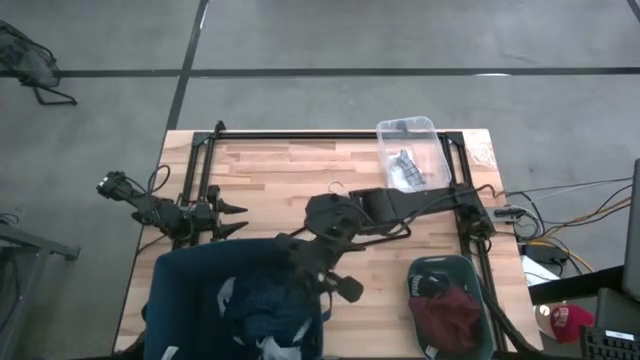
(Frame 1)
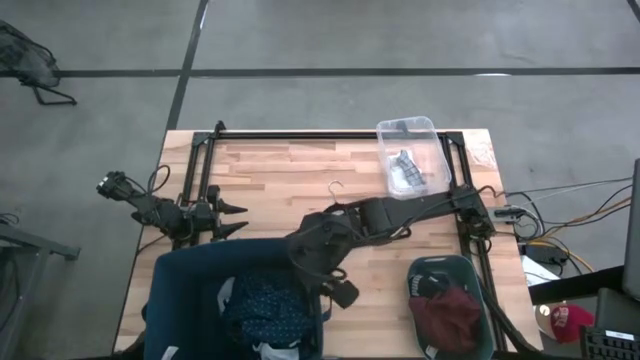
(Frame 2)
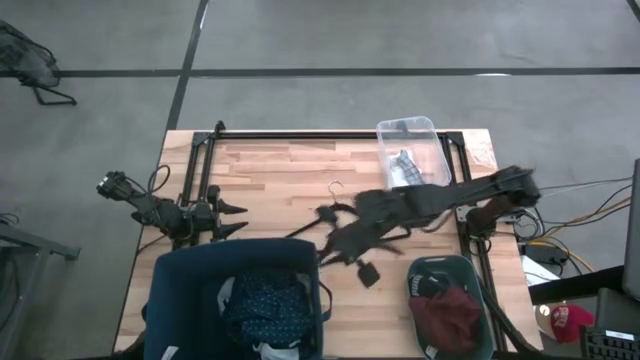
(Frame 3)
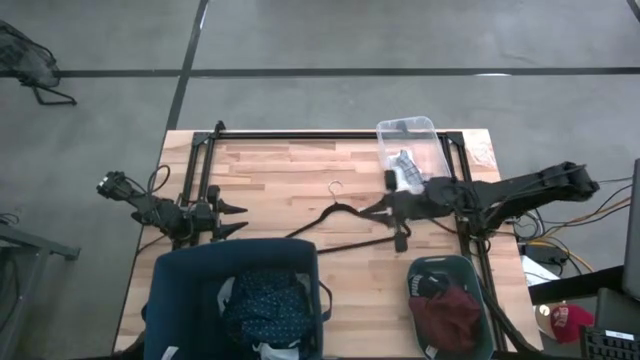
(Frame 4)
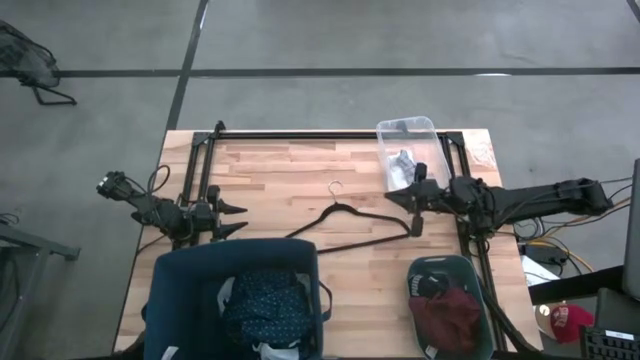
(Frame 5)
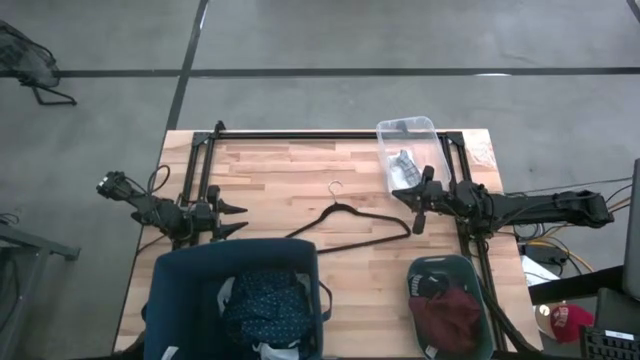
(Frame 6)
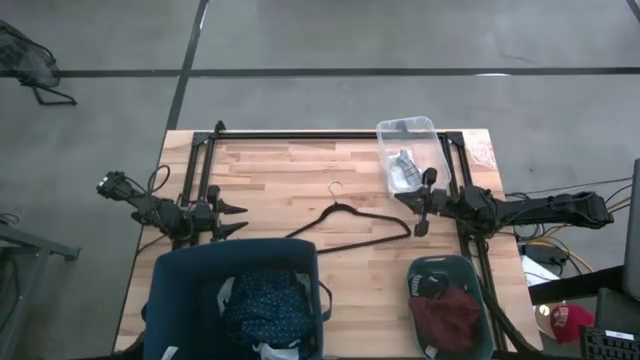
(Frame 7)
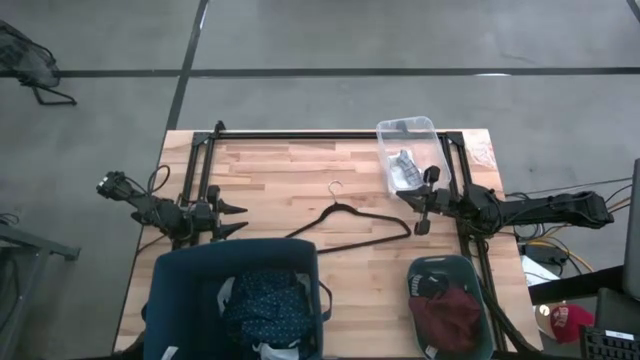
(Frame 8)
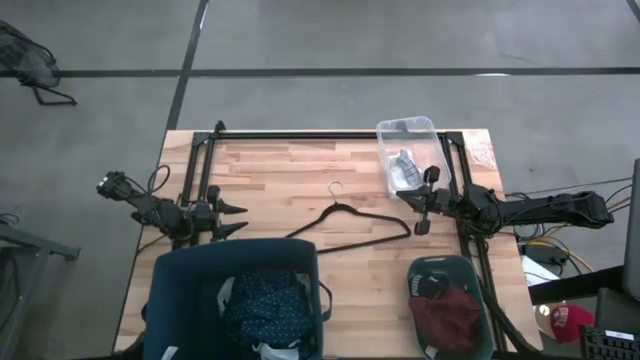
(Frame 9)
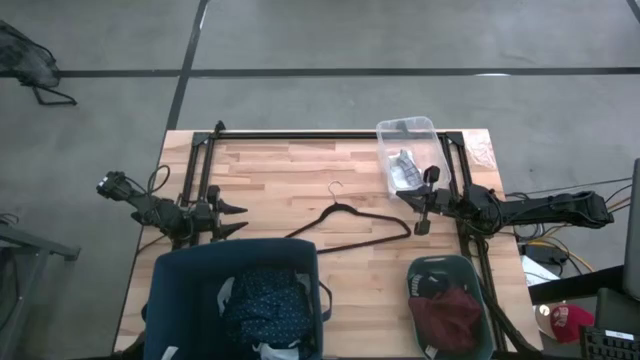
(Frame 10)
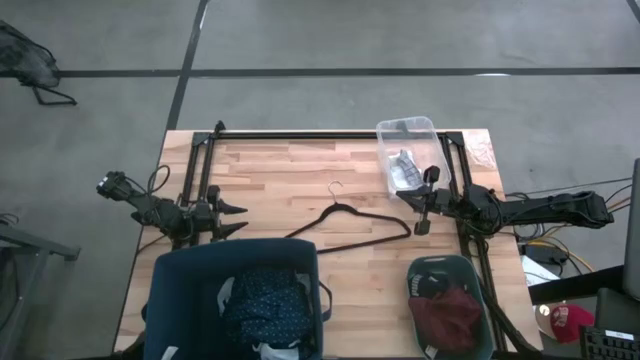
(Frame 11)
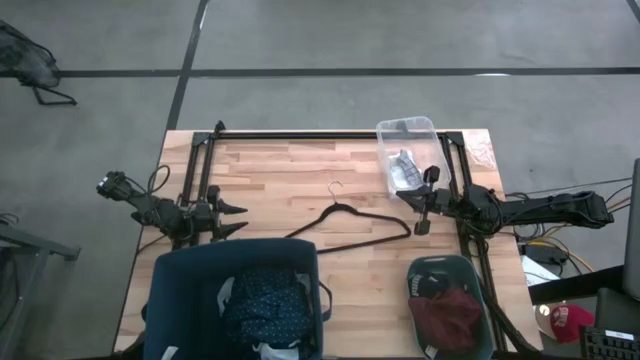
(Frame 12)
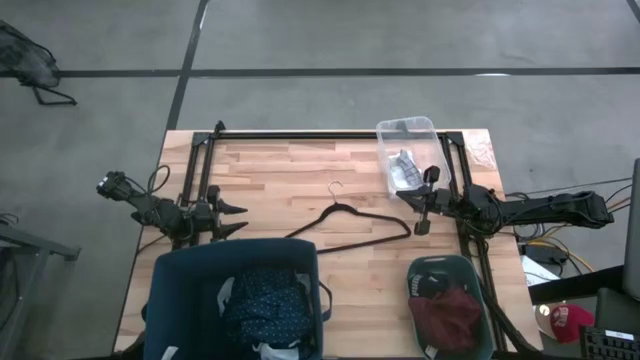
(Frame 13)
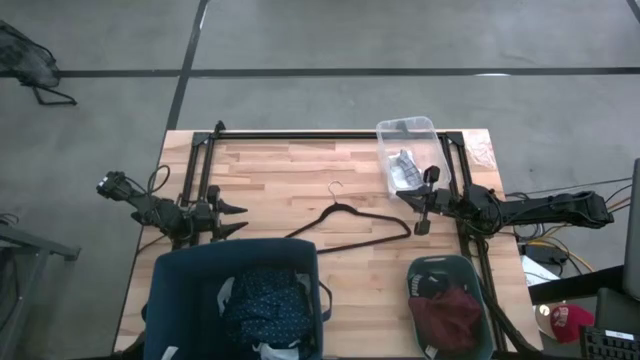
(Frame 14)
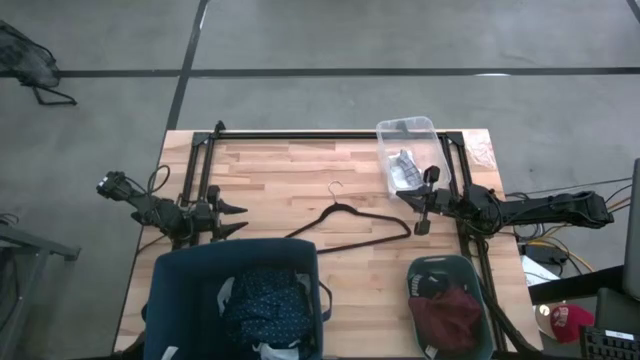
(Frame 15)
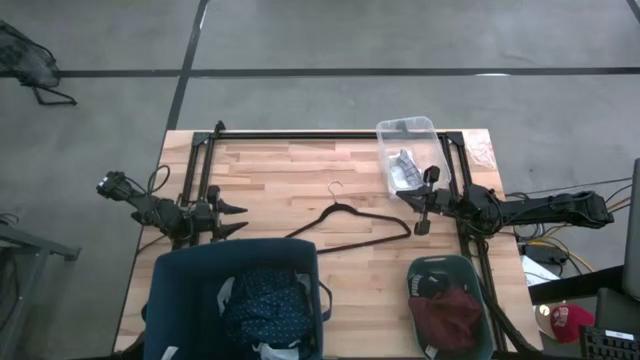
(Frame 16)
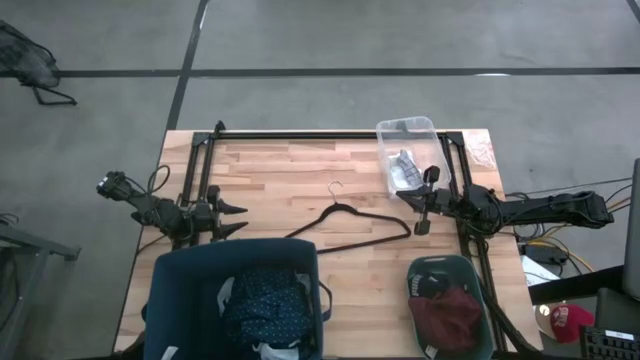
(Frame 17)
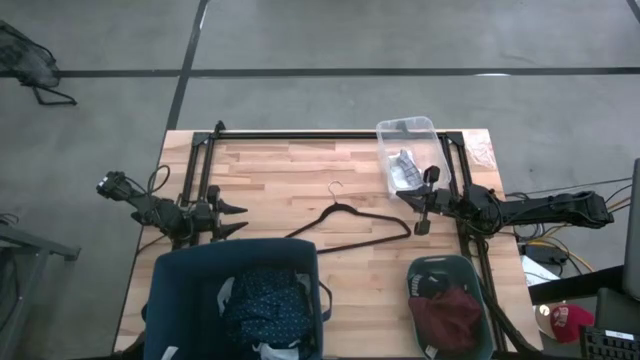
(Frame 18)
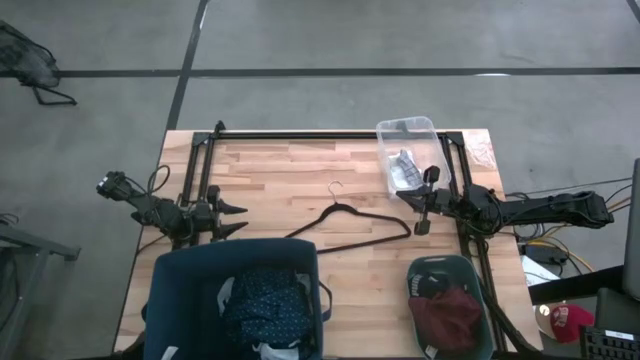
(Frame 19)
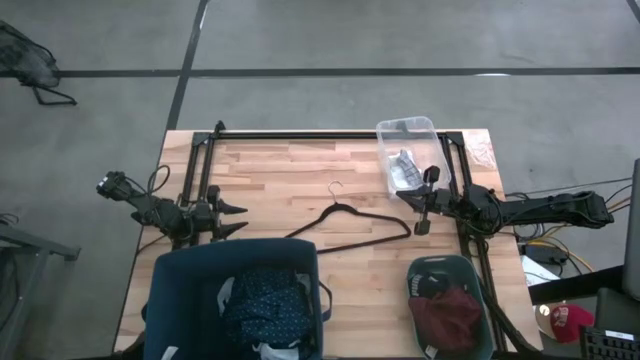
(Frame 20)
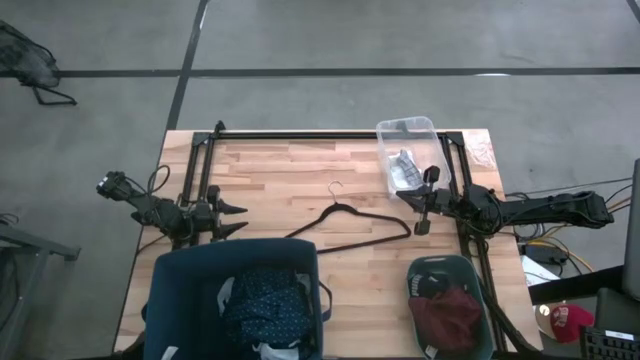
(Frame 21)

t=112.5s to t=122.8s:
Task: Pick & Place Cloths
Return to Home Position

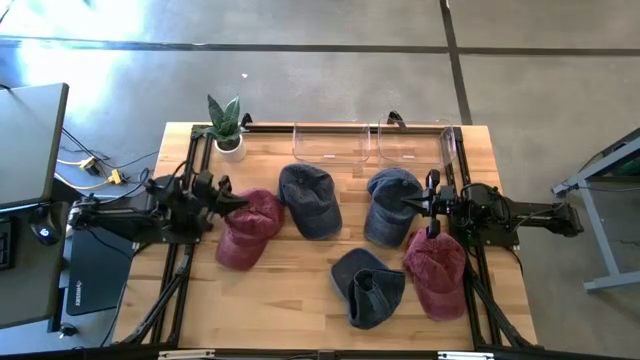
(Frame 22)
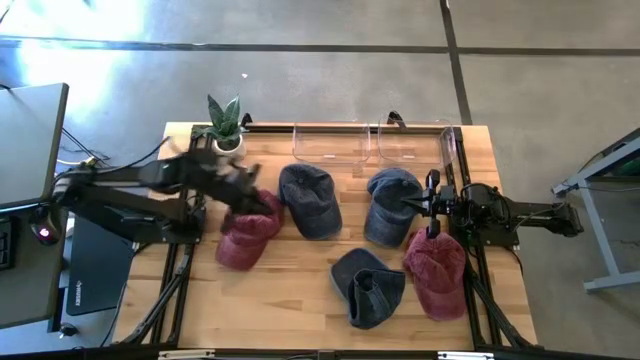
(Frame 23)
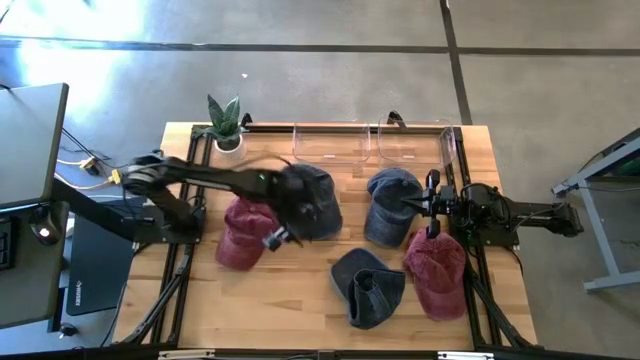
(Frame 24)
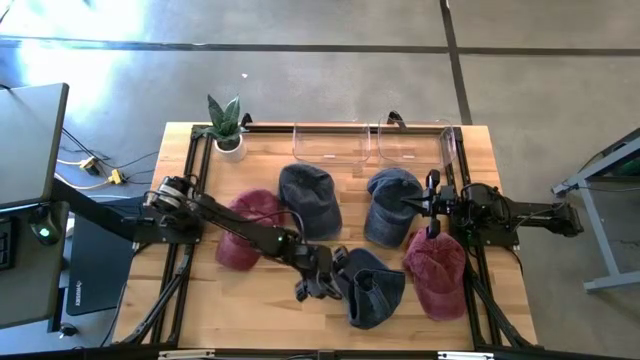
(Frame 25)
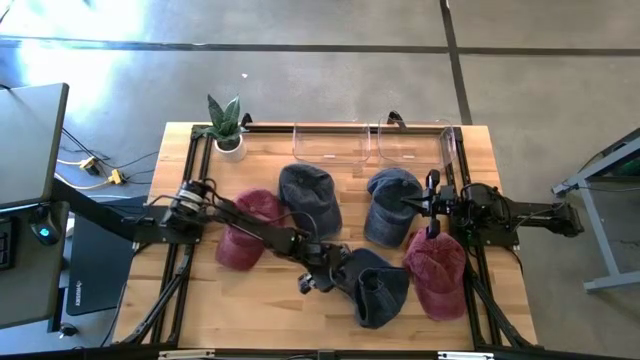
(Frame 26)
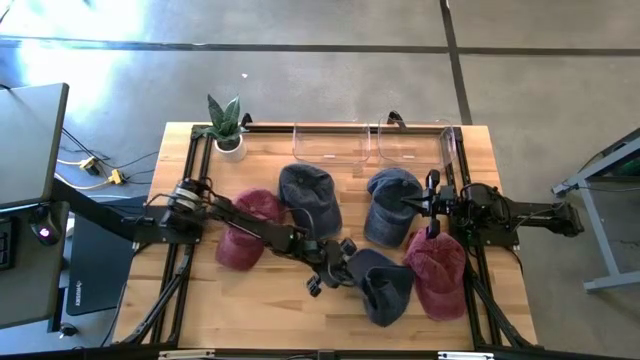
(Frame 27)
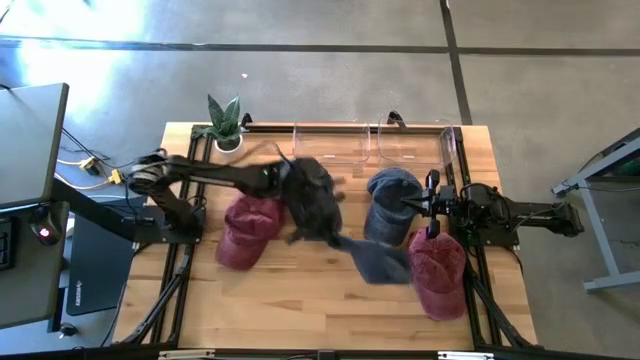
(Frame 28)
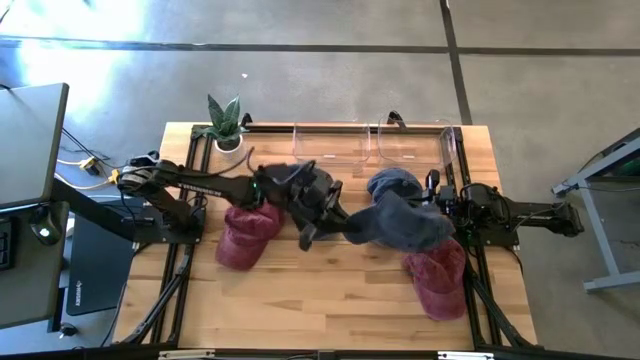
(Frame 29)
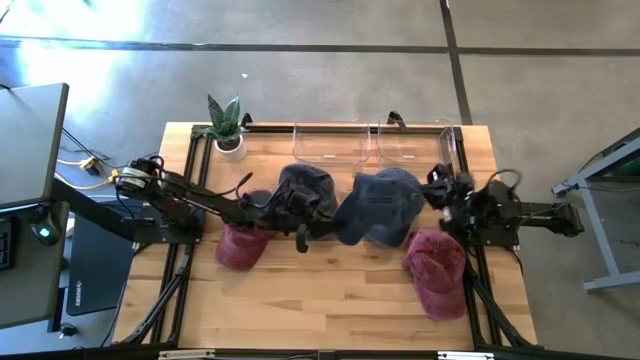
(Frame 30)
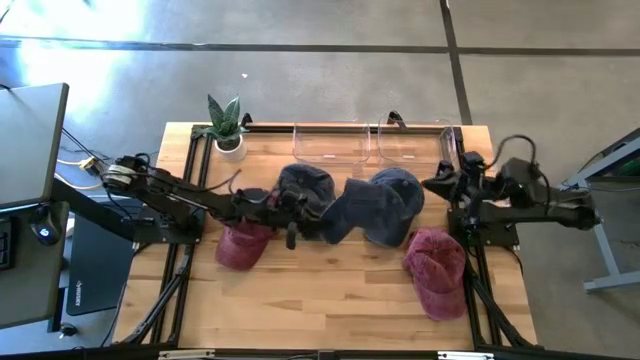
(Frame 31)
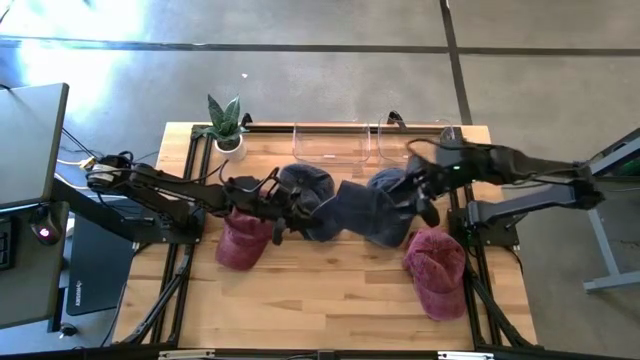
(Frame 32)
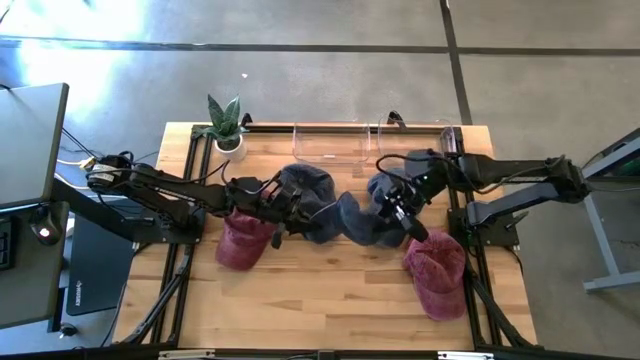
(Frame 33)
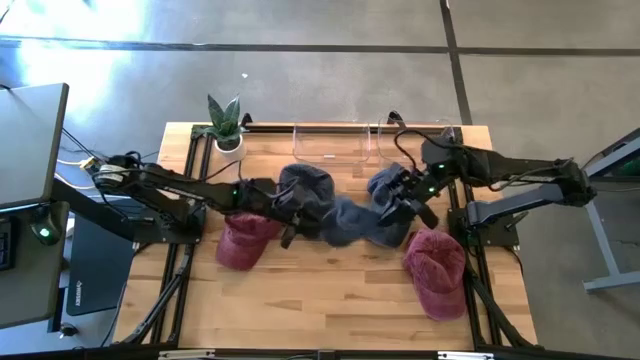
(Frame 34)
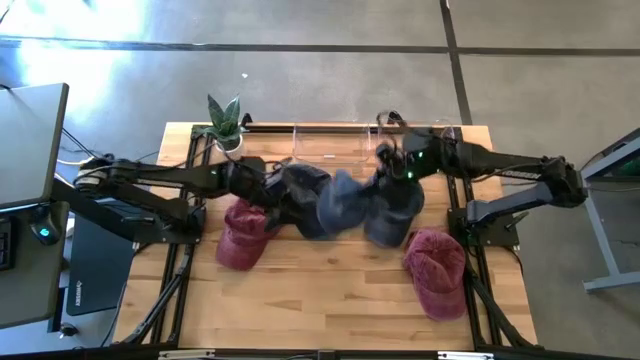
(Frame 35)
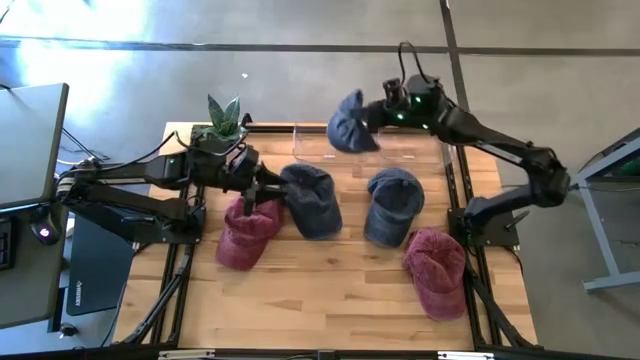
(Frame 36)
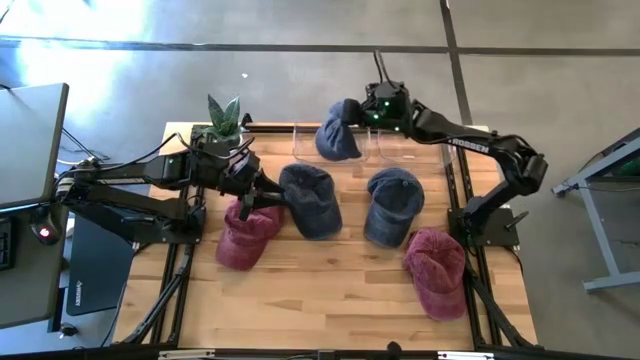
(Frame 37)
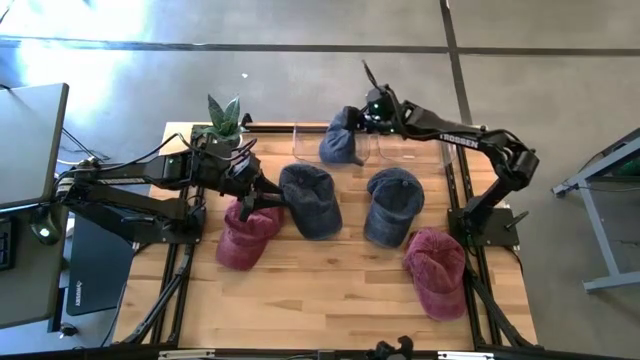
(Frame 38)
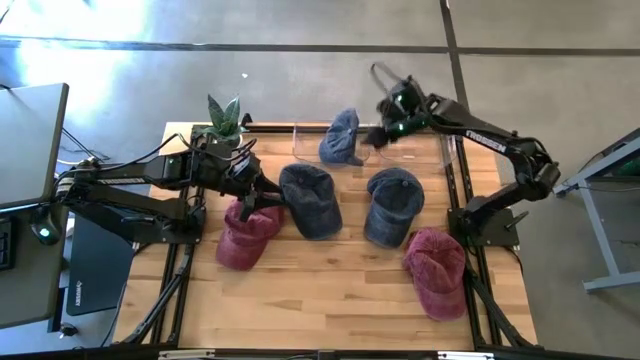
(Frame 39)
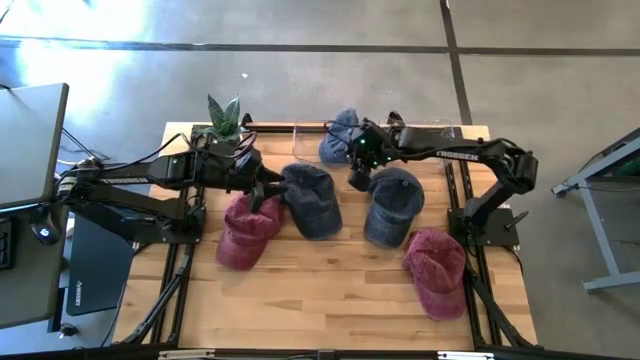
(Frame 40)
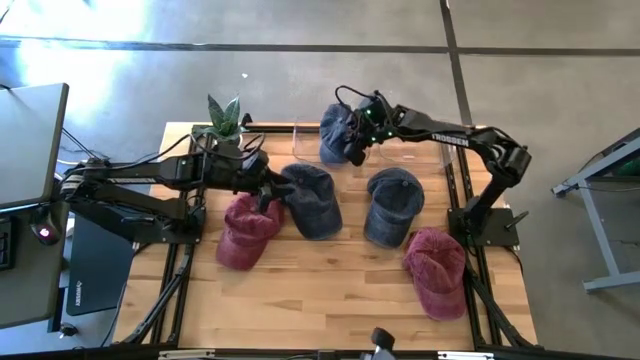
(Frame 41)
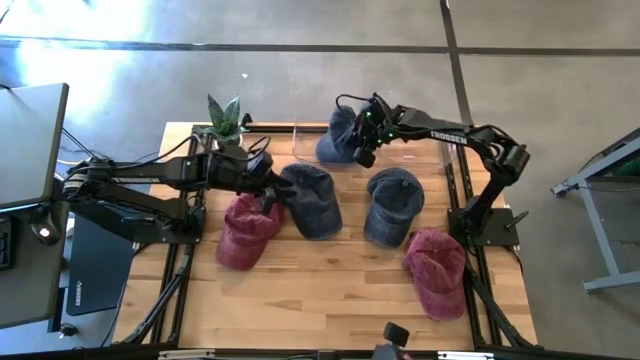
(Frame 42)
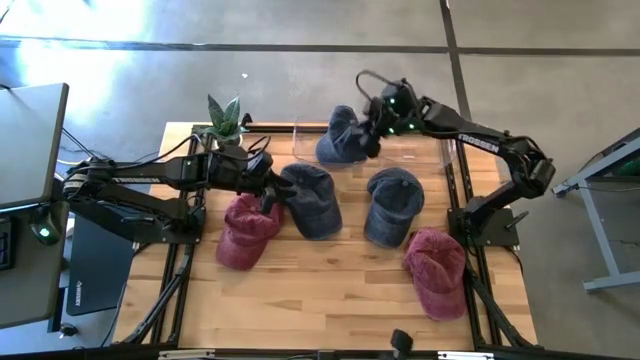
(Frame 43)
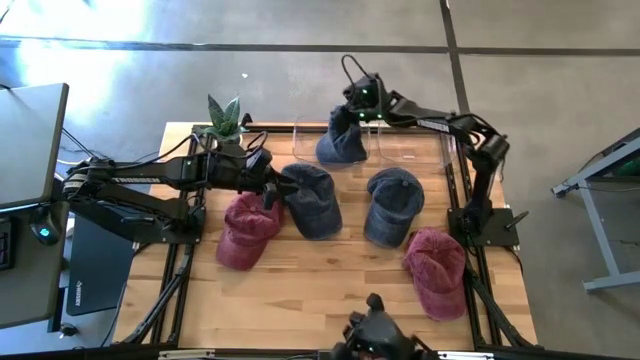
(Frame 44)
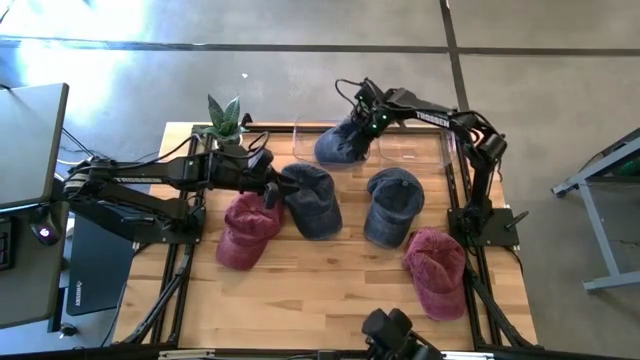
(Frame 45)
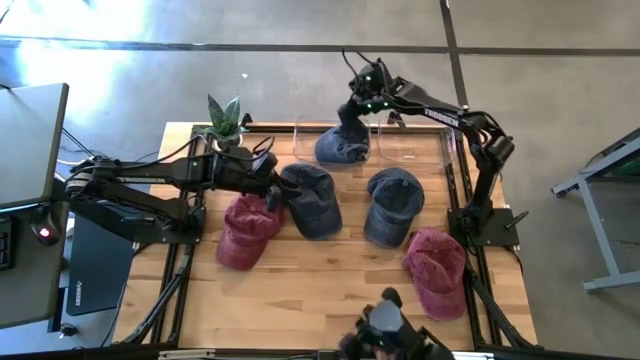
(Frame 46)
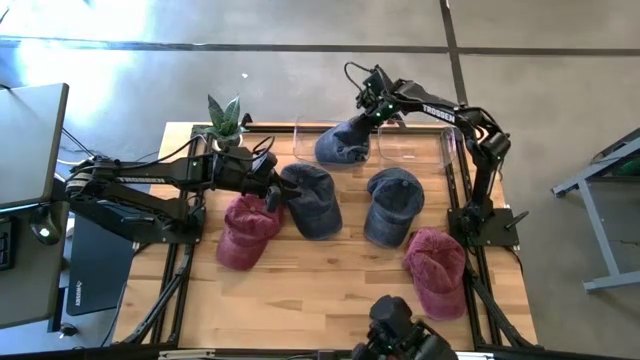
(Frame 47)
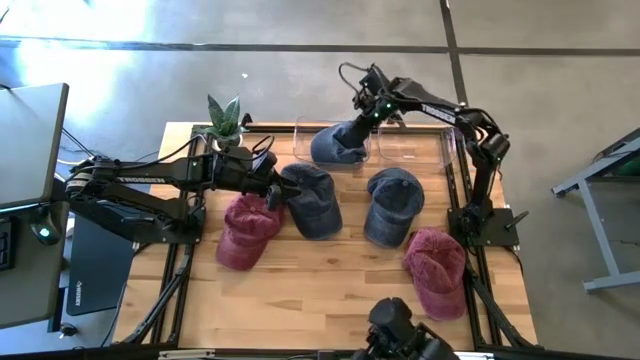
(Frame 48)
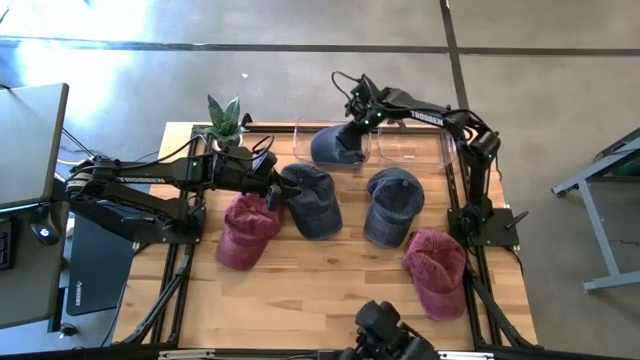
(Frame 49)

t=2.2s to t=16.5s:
Task: Pick & Place hat
Put the bottom dark blue cap into the left transparent bin
